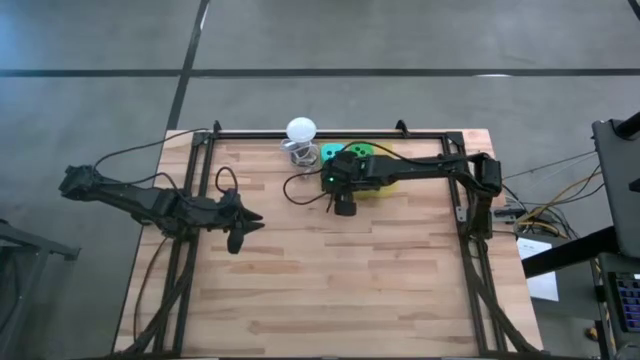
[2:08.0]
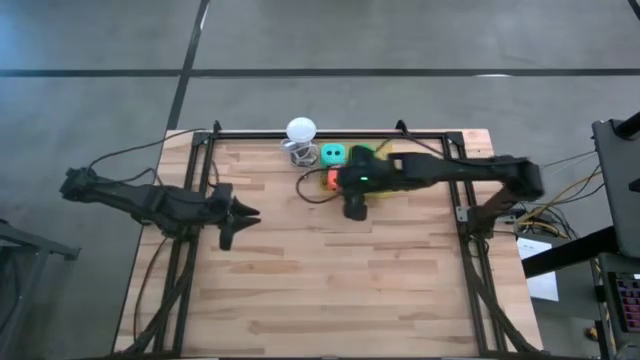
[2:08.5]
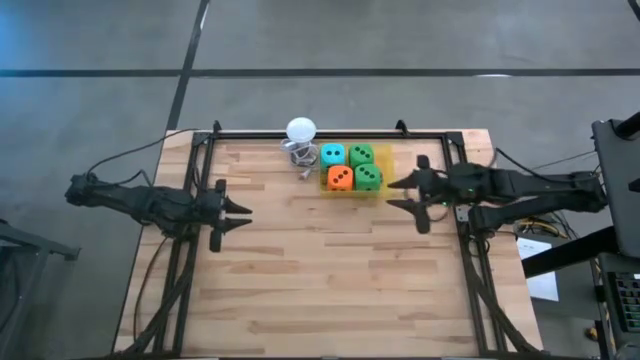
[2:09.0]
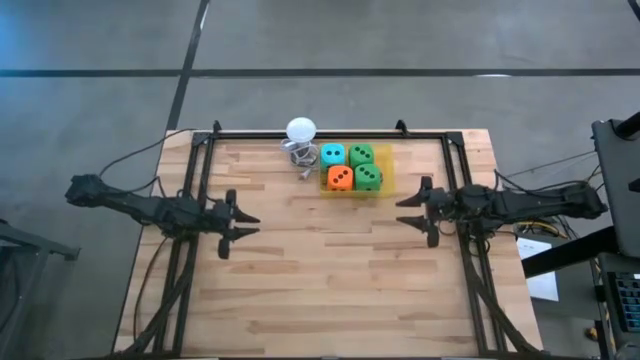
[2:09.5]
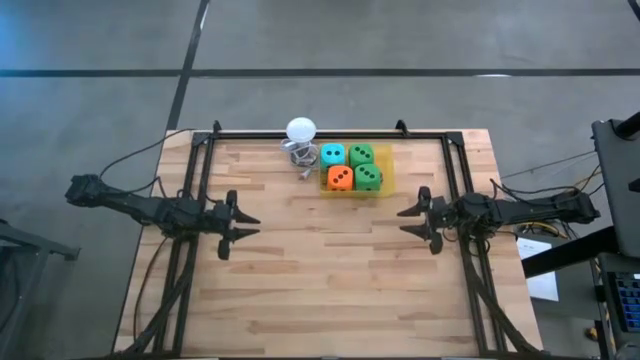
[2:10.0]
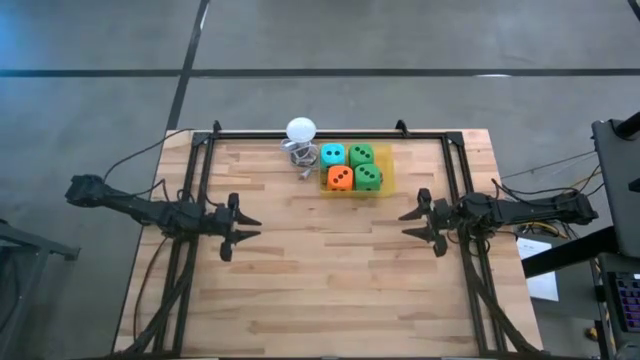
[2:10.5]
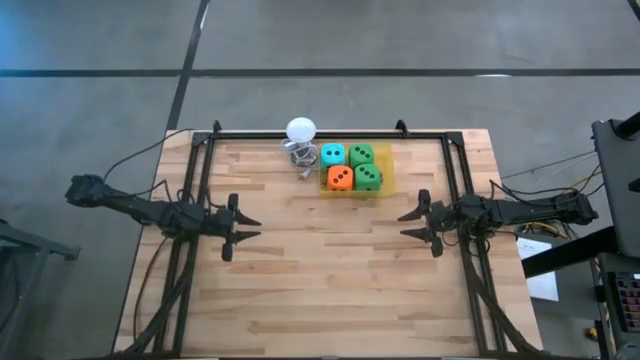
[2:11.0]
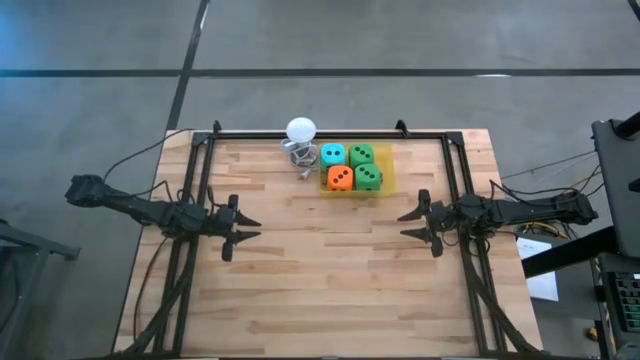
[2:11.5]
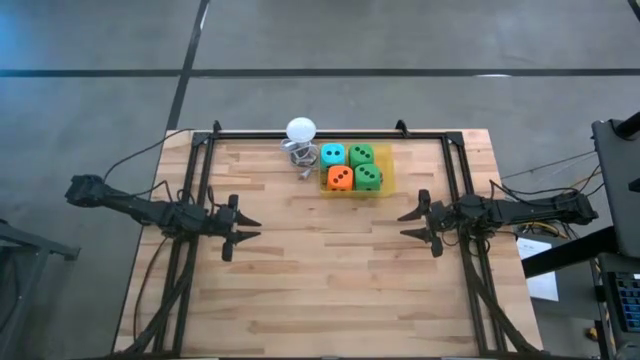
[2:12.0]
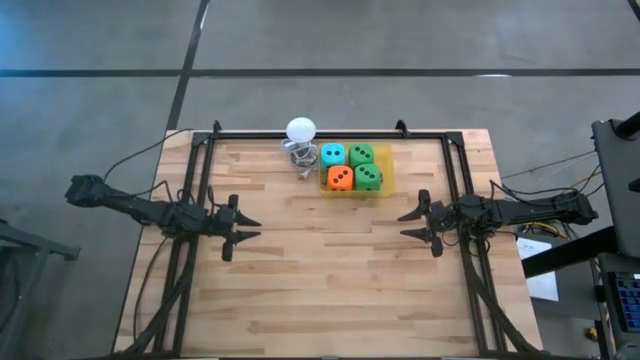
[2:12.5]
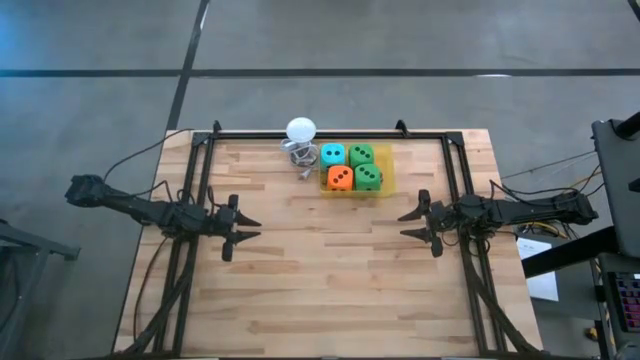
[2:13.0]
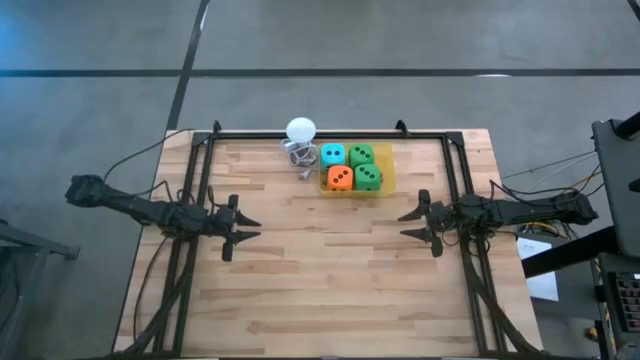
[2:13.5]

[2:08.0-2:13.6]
Task: Pick & Place Dice
Return to Home Position

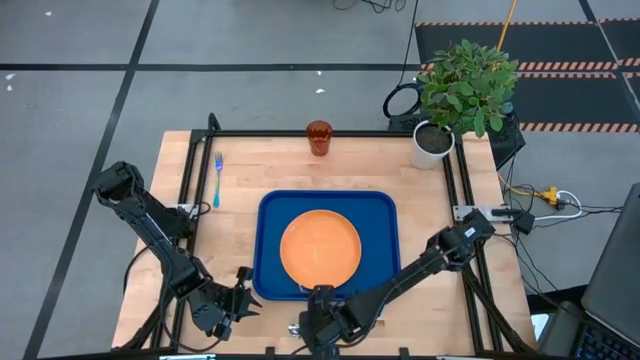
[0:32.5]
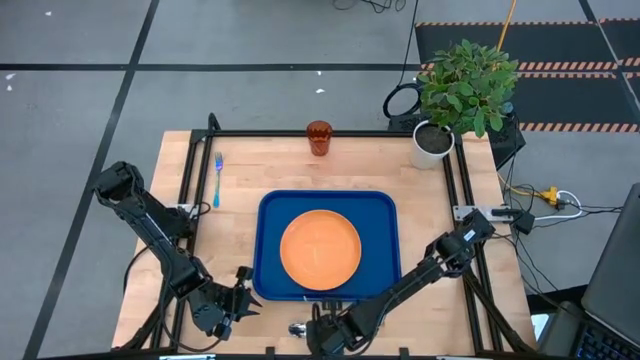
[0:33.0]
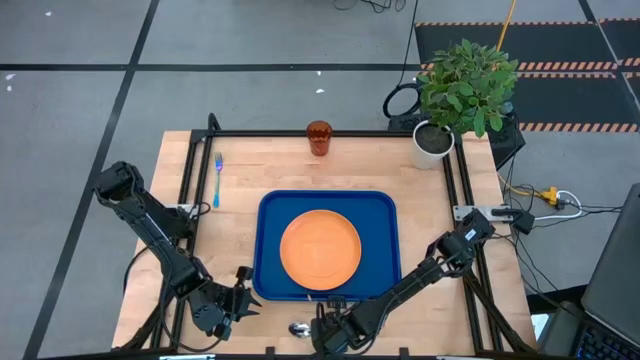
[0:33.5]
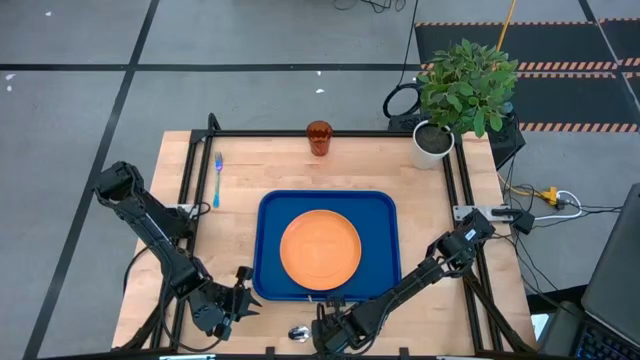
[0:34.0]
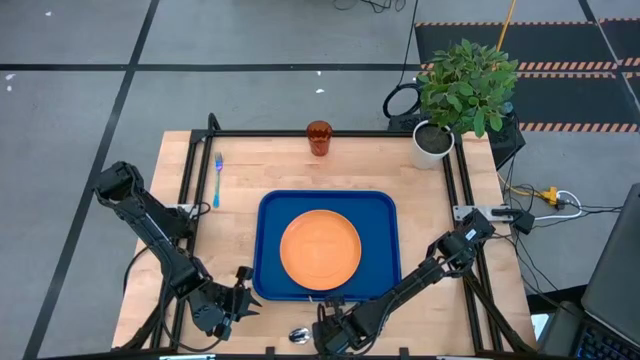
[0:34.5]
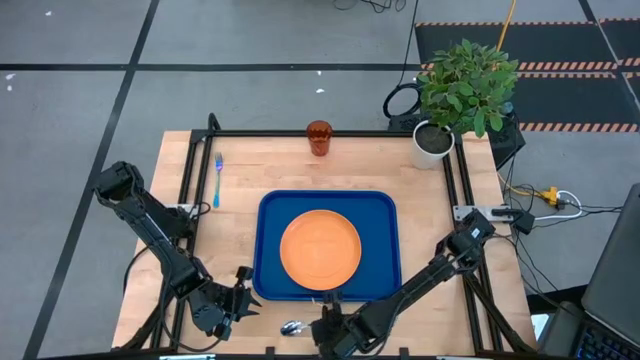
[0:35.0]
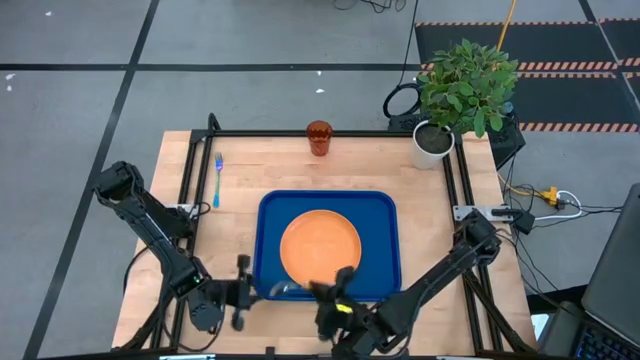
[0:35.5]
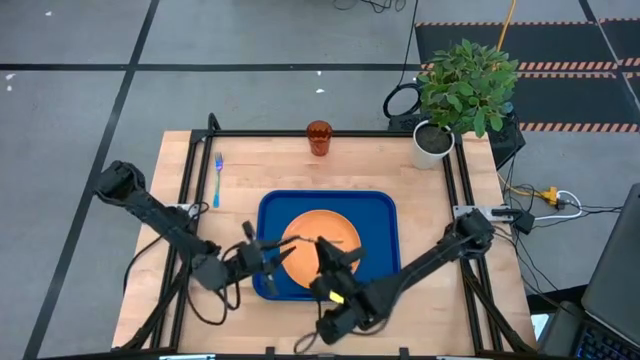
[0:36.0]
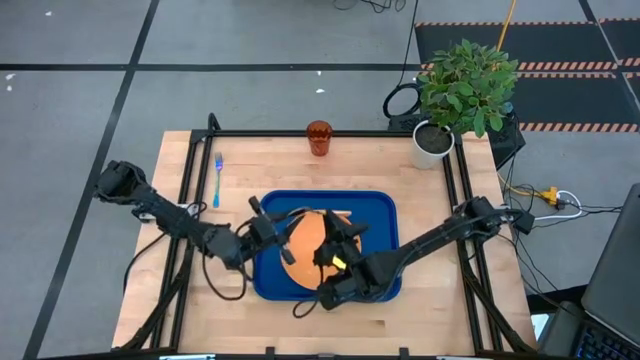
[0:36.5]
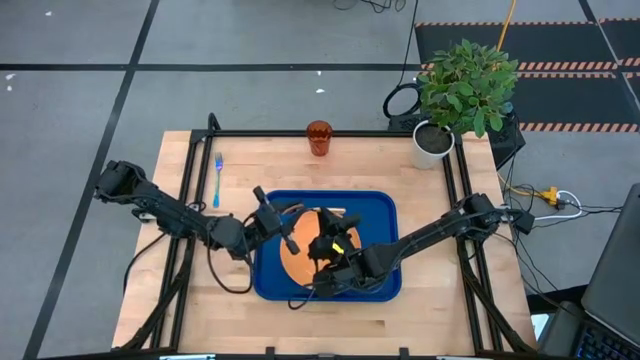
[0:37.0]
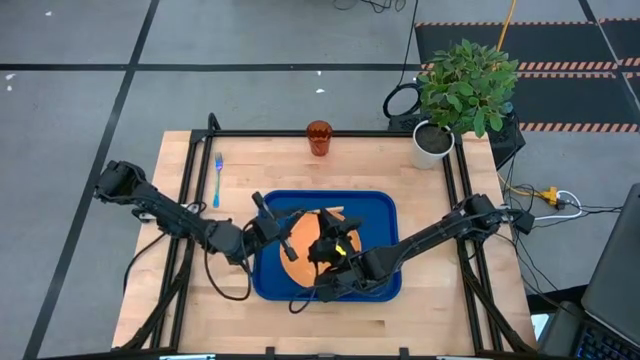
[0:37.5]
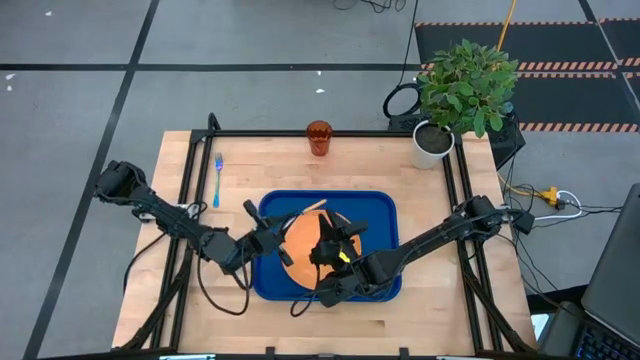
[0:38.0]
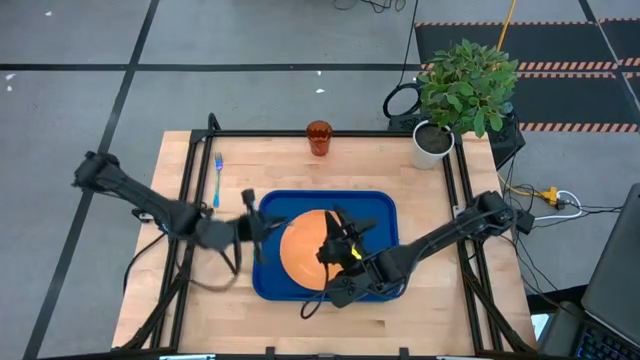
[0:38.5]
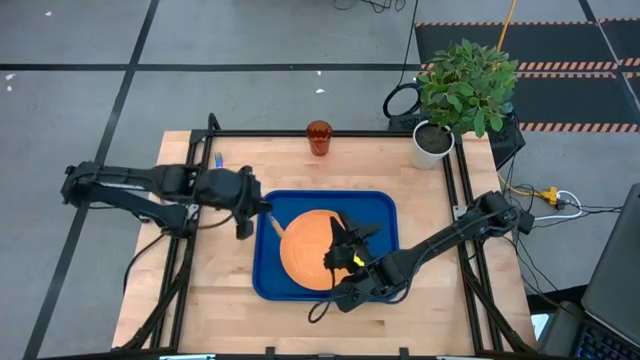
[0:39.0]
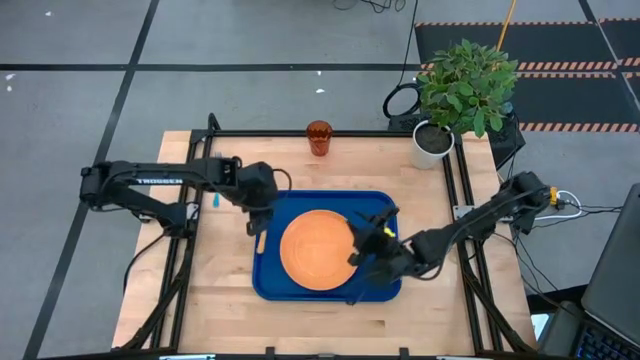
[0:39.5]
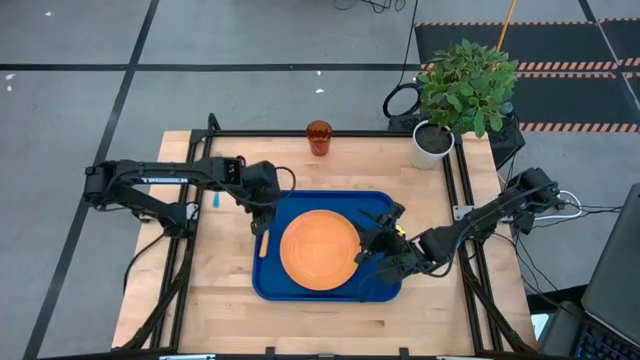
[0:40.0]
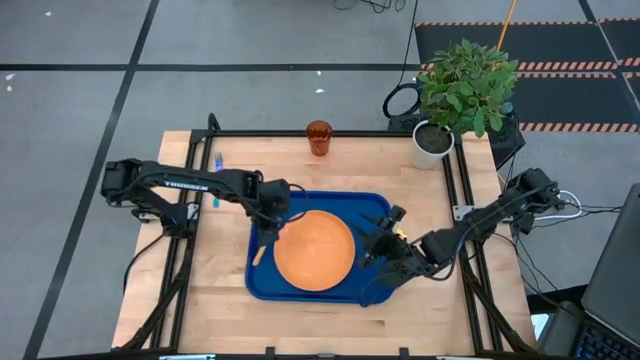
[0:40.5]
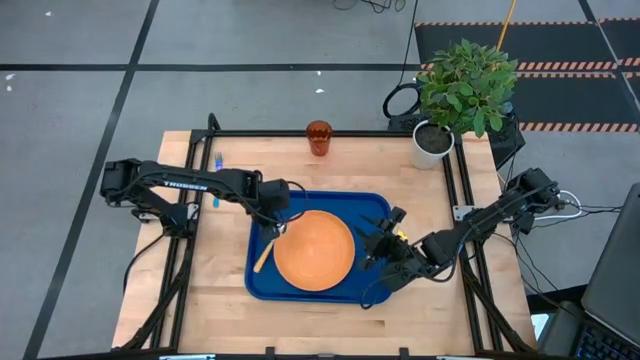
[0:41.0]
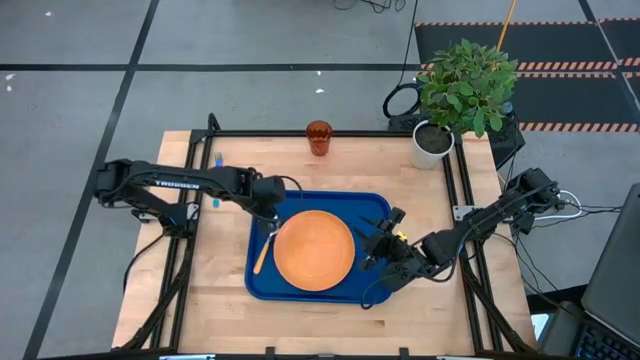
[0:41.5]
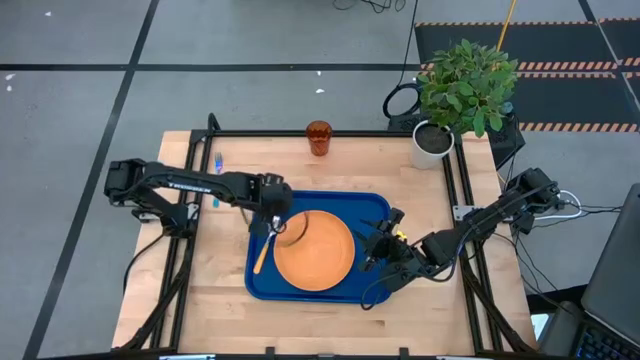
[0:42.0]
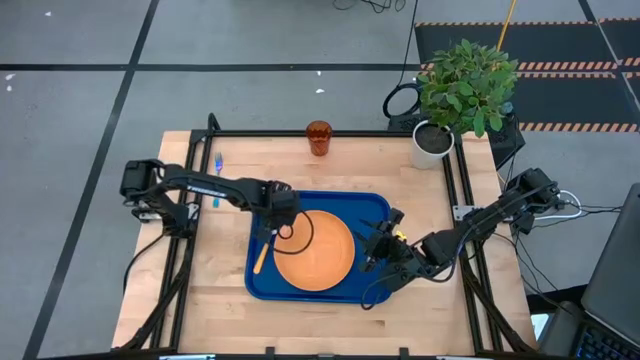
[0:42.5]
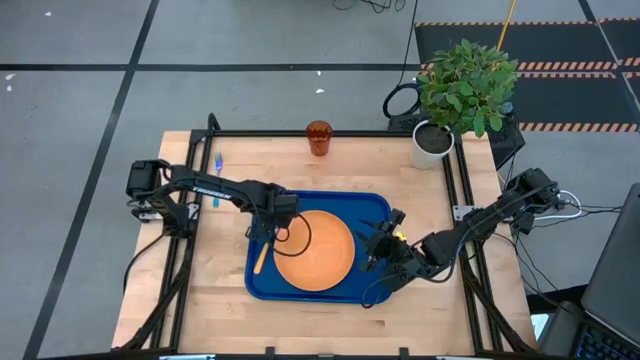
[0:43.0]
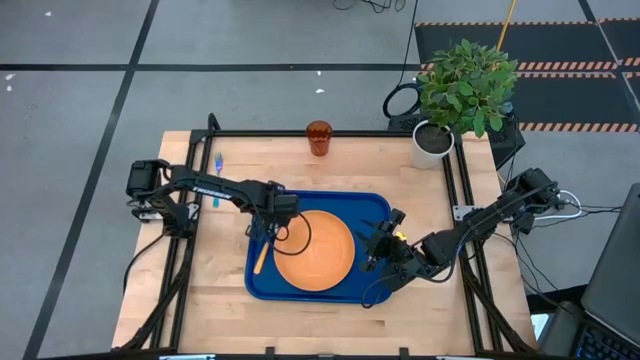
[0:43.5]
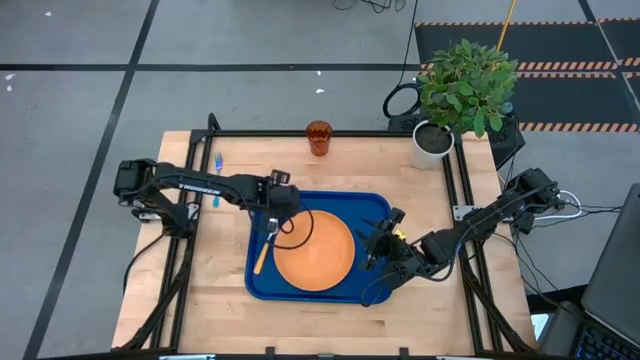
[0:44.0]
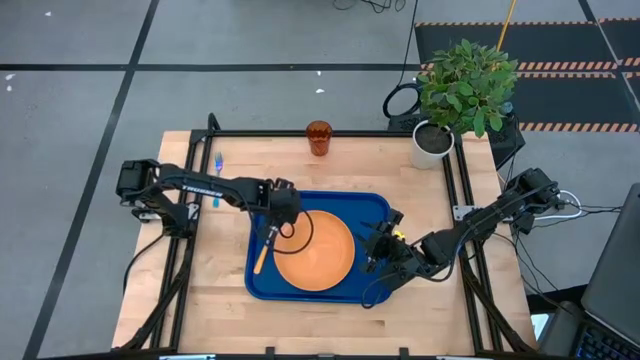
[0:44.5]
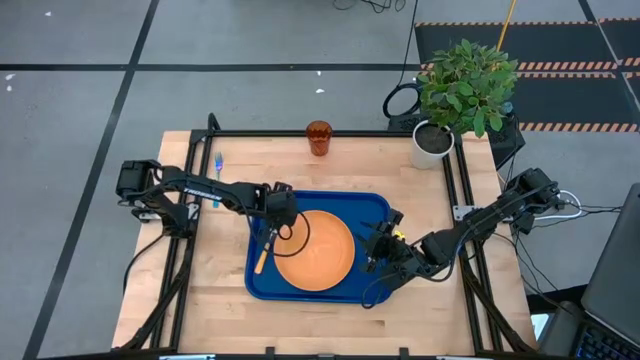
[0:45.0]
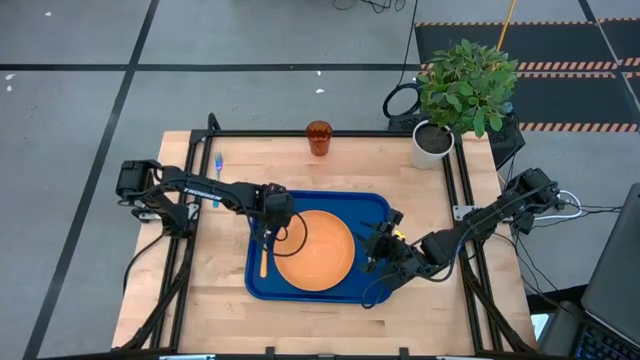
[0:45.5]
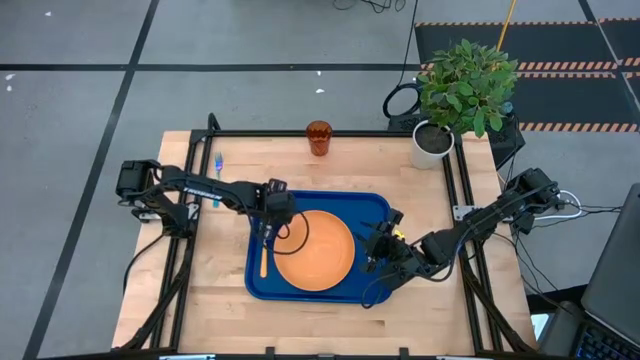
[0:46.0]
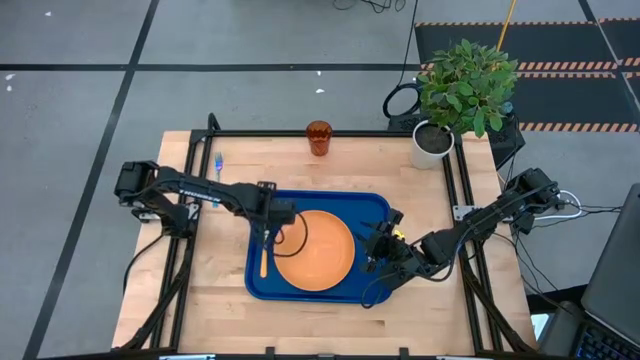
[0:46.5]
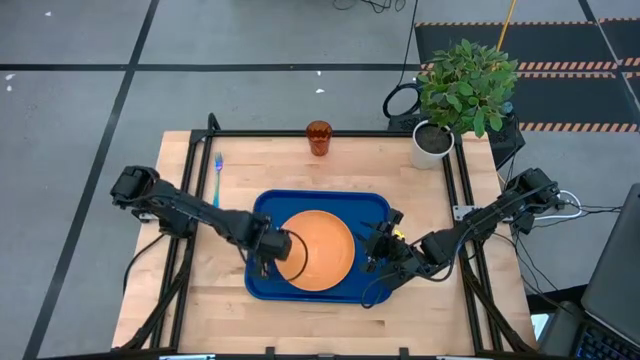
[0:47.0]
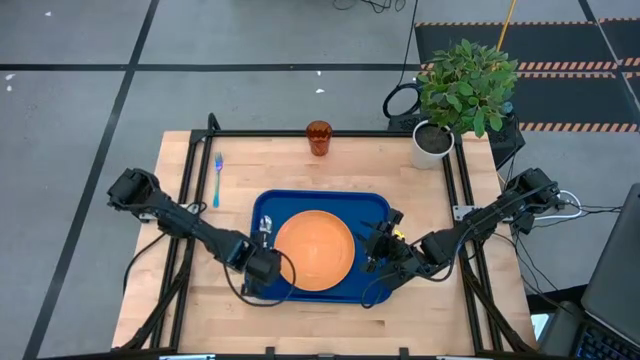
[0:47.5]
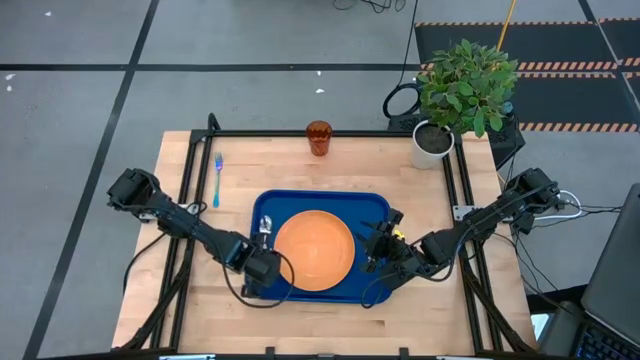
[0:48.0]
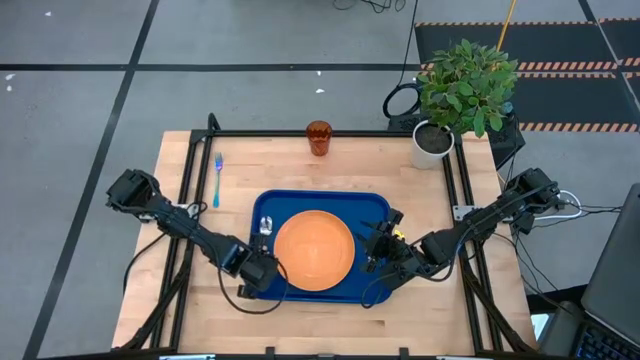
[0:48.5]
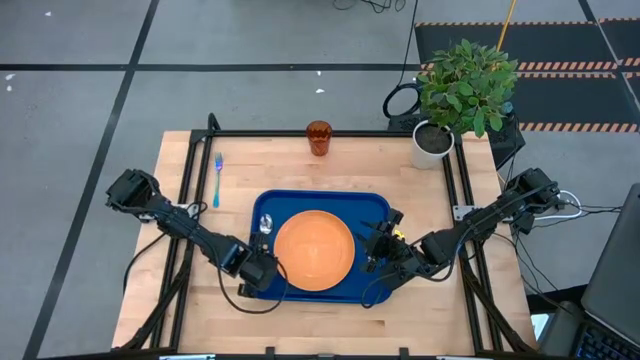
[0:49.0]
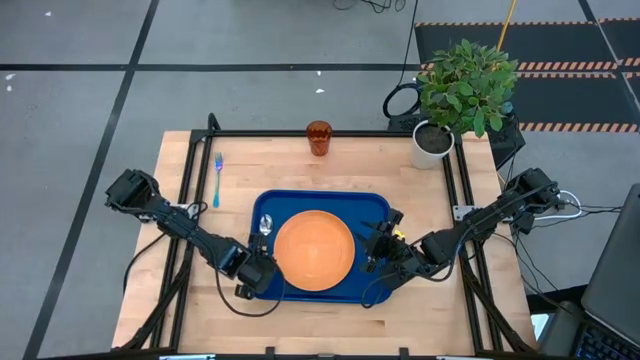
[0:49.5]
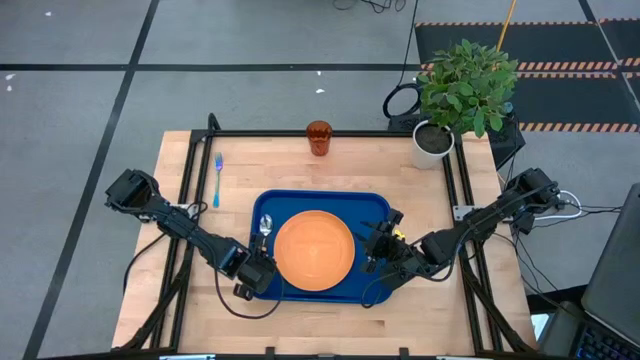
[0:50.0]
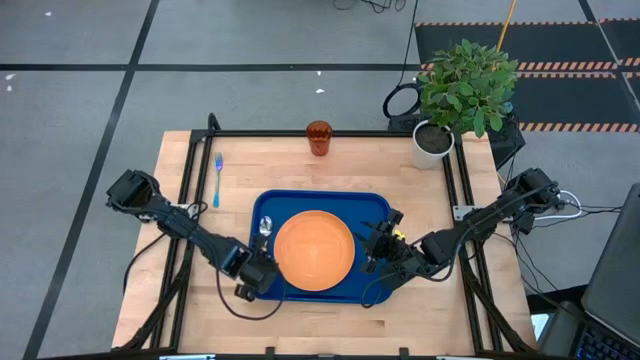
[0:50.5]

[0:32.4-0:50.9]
Task: Pick and place plate/cup/fork/spoon on tray
Put the yellow spoon on the blue serving tray to the left of the orange plate
